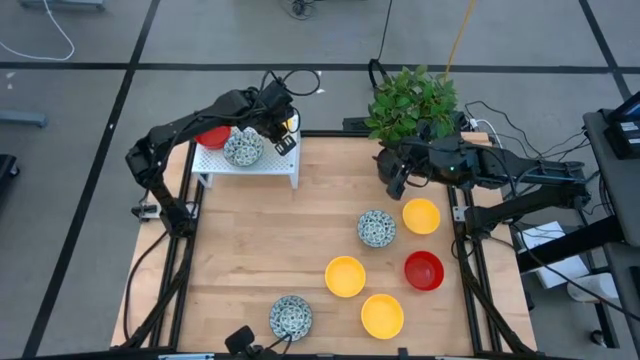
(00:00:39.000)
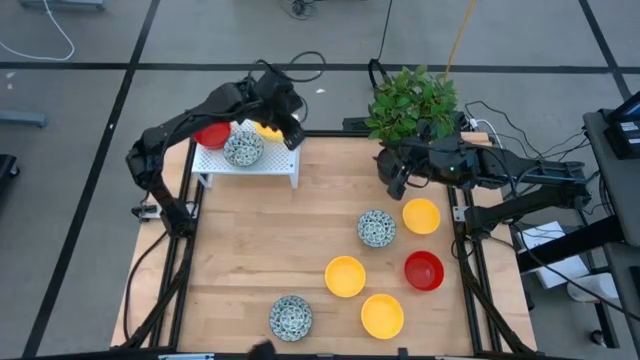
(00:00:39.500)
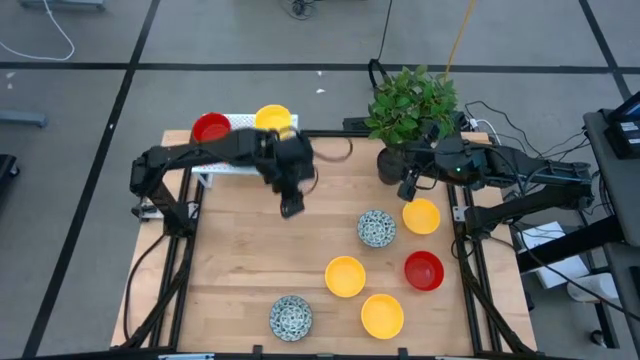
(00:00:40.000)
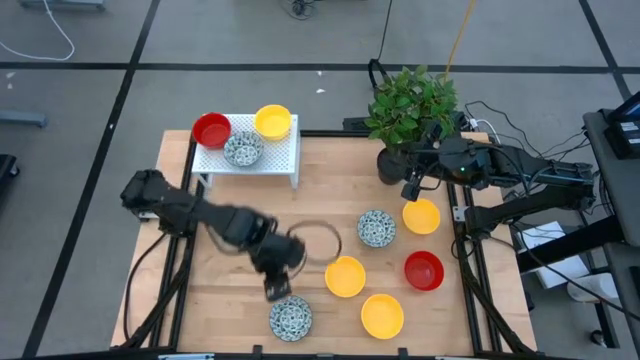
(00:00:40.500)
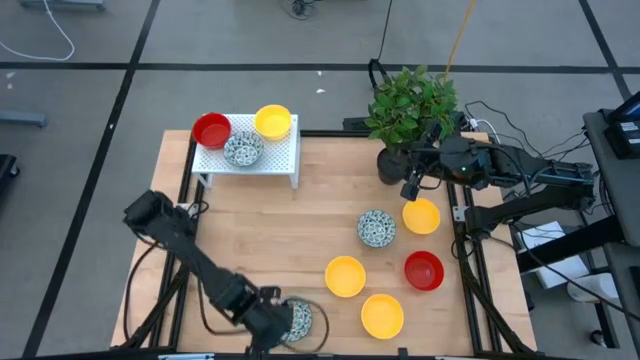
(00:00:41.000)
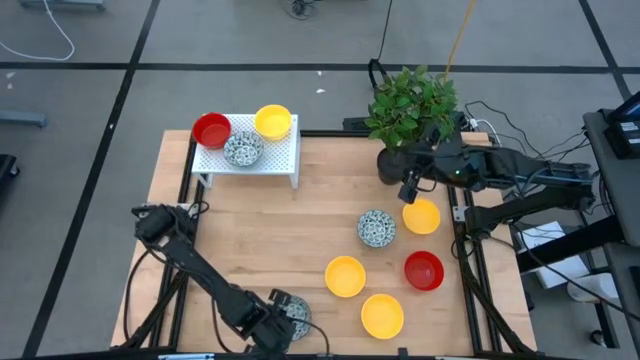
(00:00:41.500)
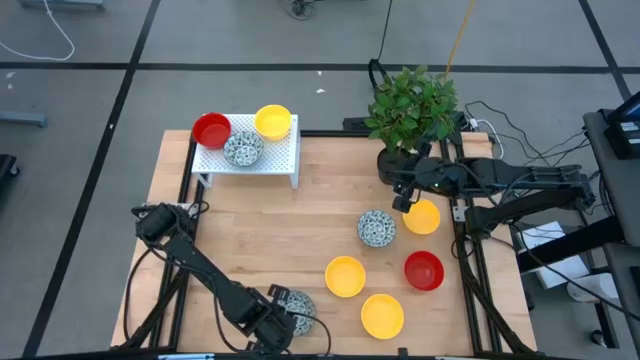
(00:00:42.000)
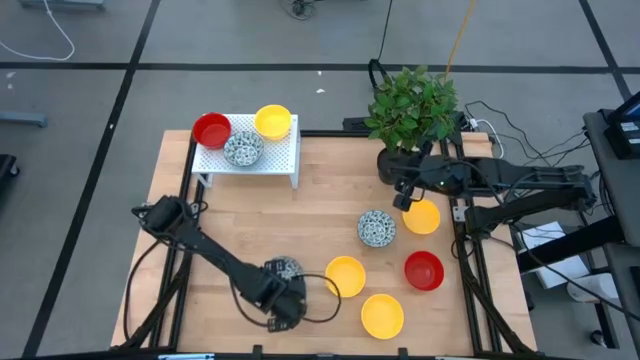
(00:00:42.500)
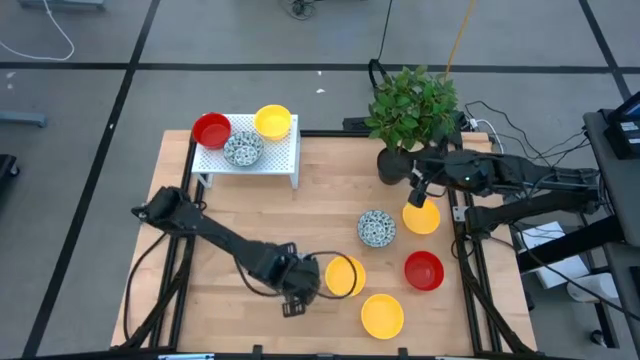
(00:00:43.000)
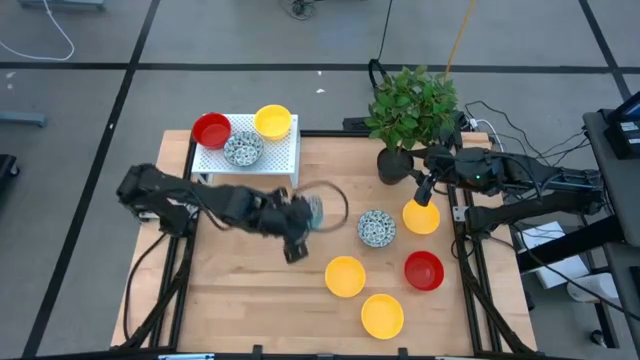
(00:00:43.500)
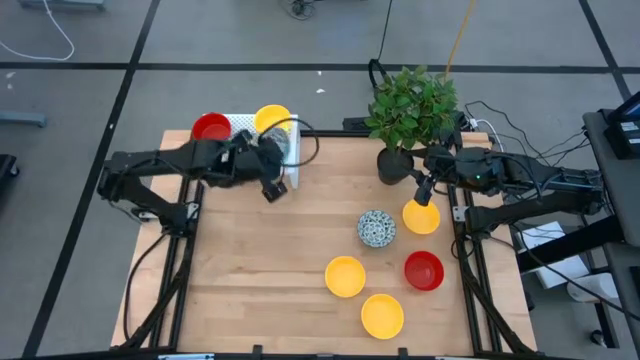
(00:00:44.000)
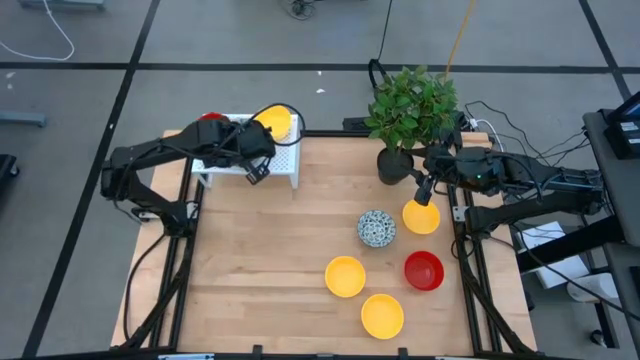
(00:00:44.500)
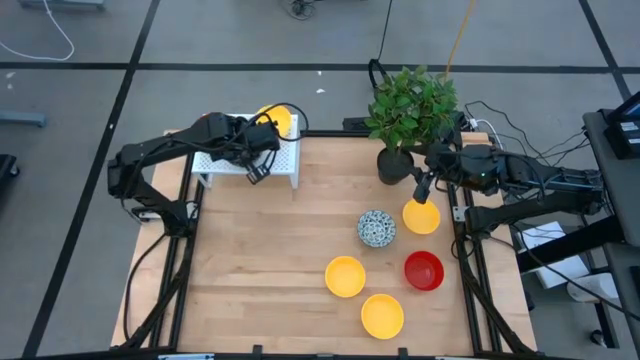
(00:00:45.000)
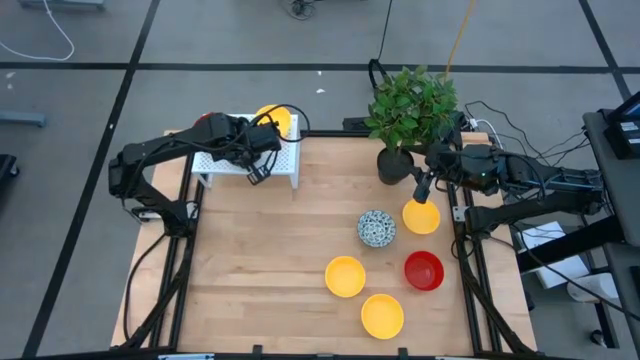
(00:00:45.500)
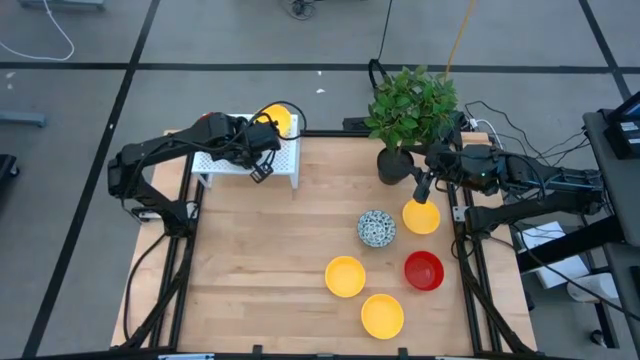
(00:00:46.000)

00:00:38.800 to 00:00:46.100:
Task: Pick & Place Mini bowls
Stack the blue bowl on the blue bowl on the shelf

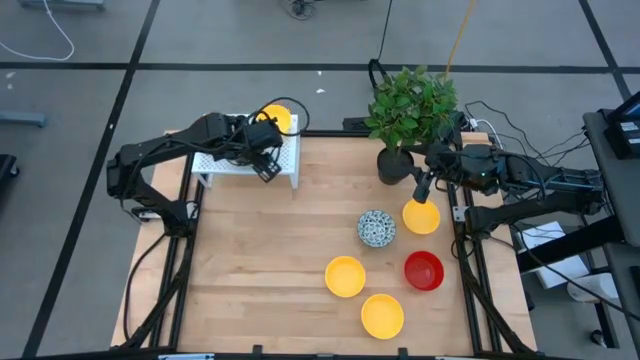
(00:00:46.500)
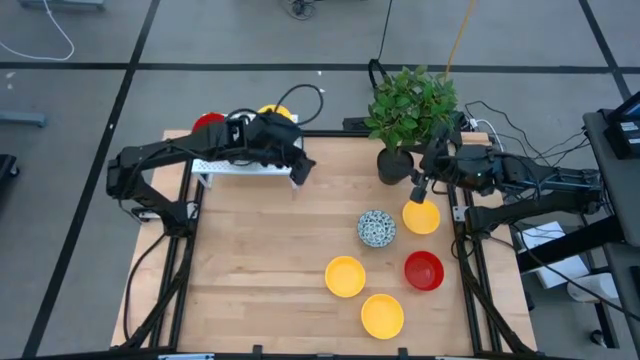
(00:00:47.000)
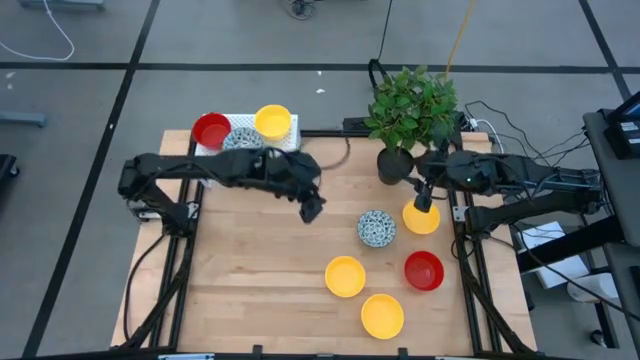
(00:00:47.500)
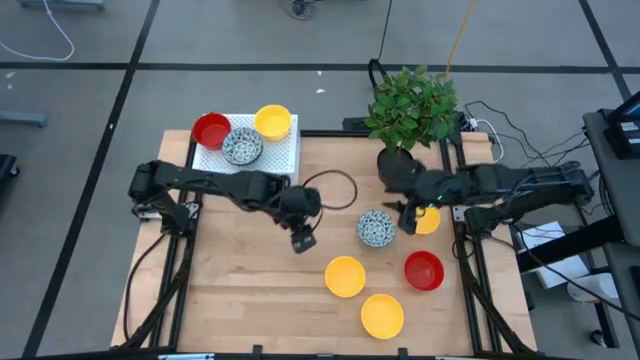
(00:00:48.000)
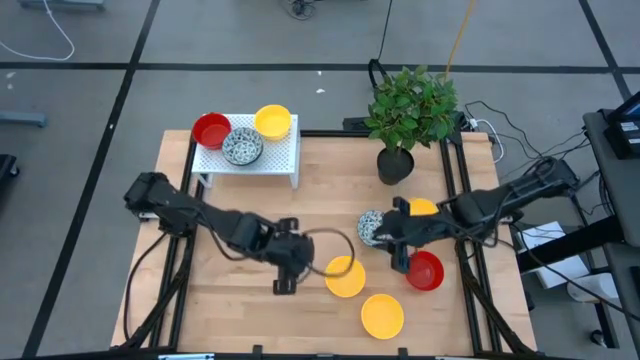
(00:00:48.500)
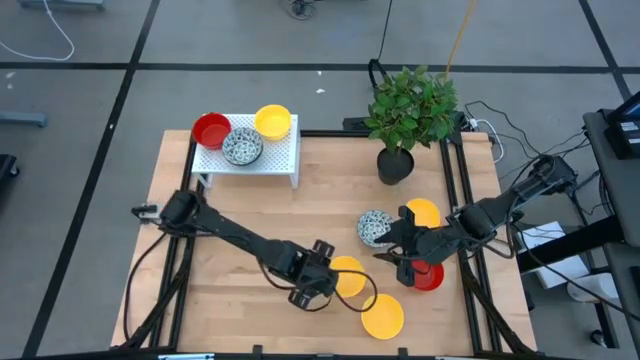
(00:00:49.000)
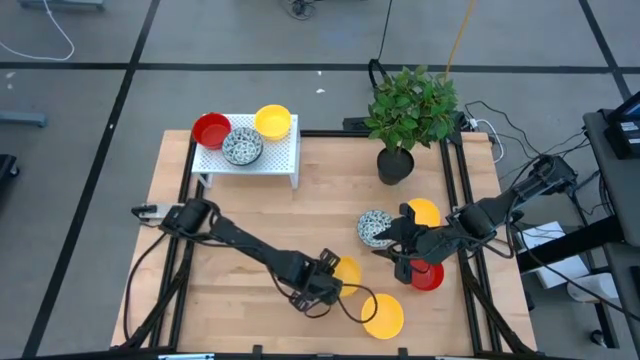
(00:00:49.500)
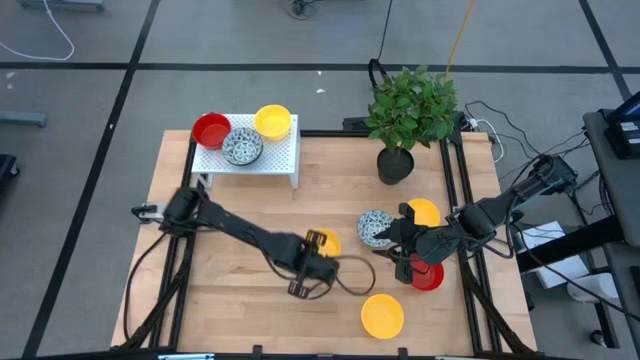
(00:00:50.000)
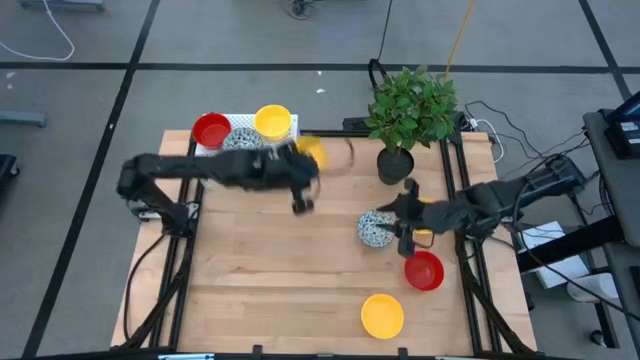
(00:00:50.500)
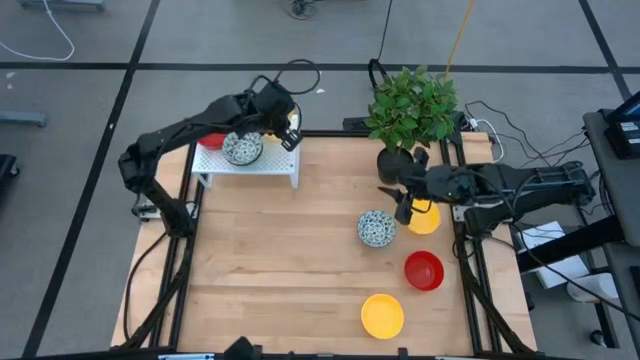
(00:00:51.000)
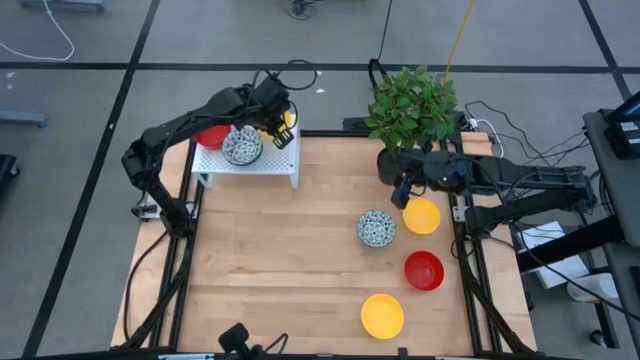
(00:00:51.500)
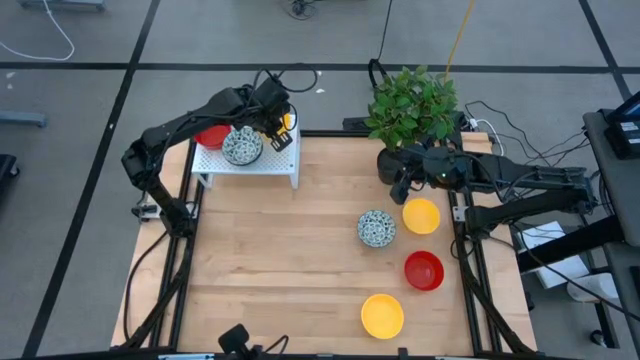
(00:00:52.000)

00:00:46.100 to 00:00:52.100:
Stack the yellow bowl on the yellow bowl on the shelf

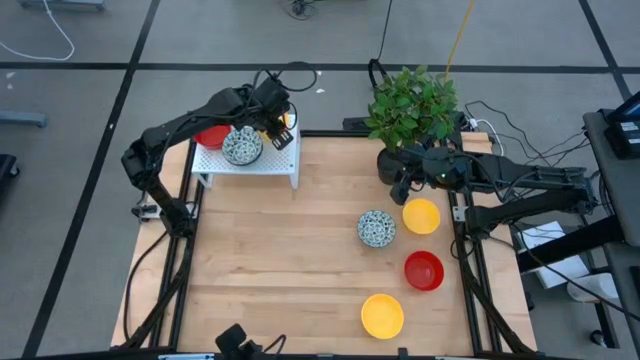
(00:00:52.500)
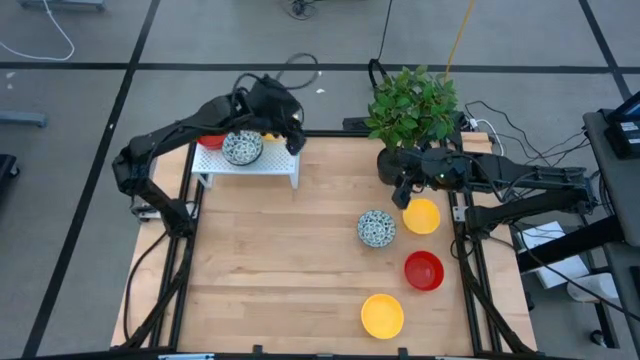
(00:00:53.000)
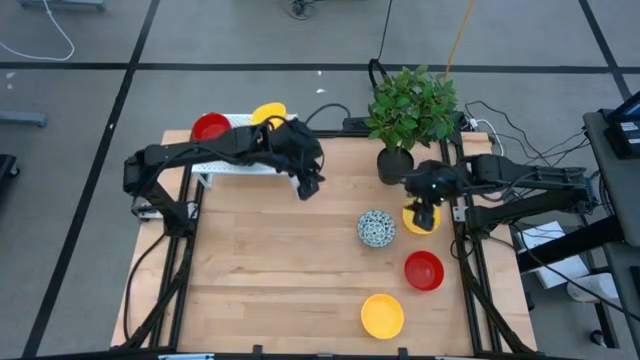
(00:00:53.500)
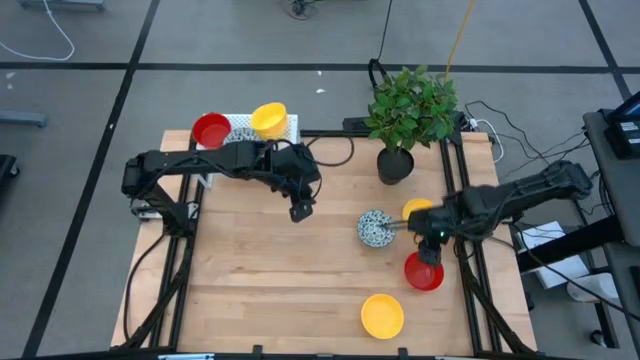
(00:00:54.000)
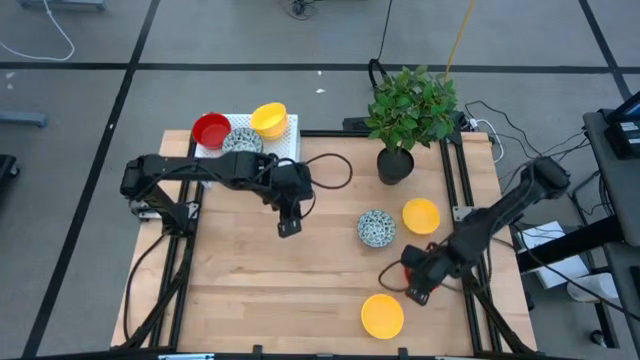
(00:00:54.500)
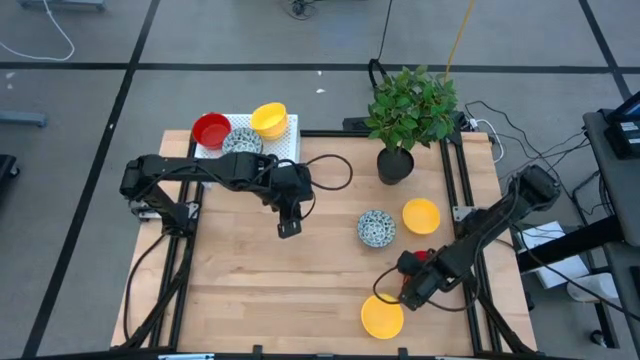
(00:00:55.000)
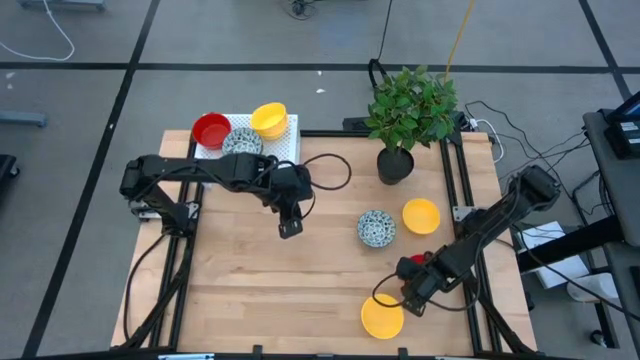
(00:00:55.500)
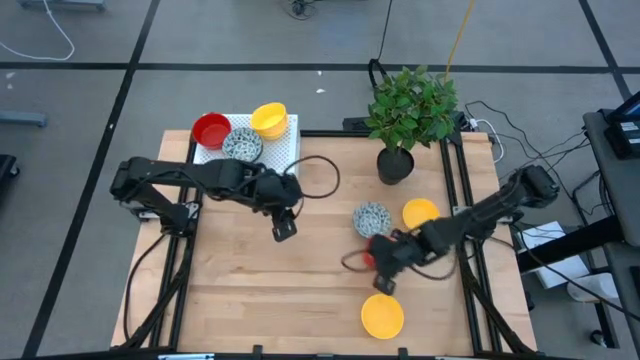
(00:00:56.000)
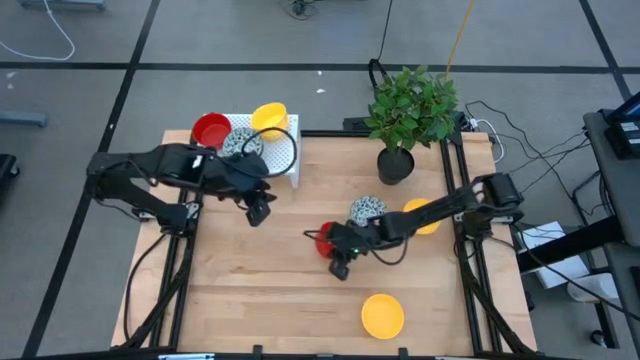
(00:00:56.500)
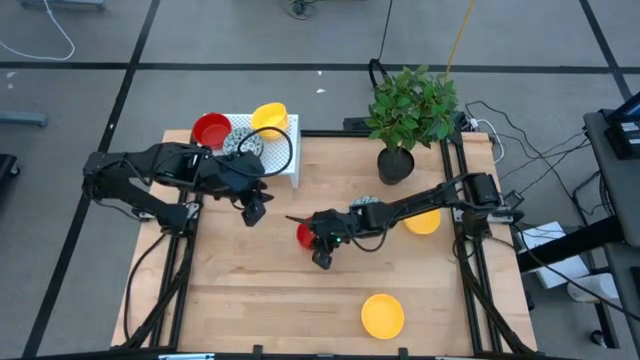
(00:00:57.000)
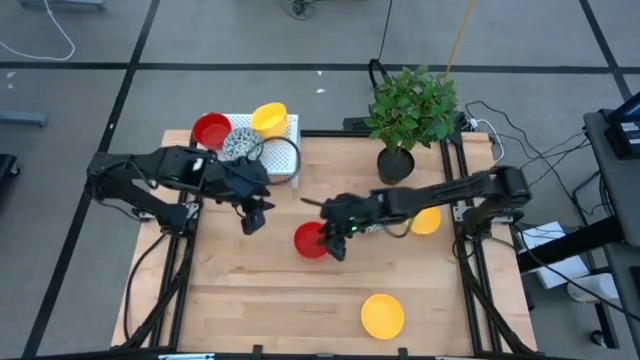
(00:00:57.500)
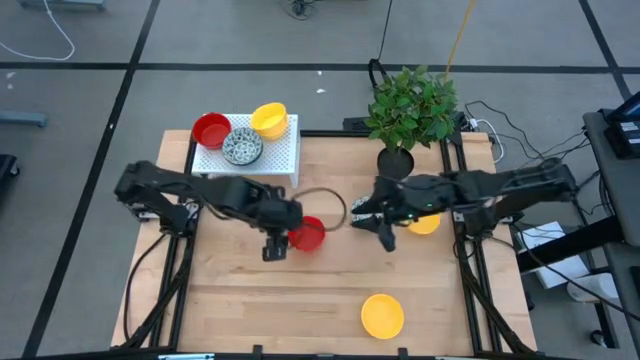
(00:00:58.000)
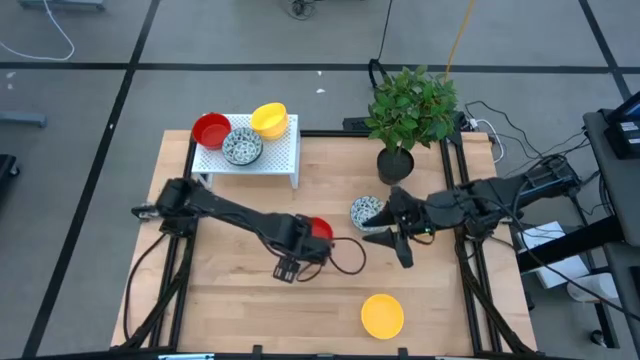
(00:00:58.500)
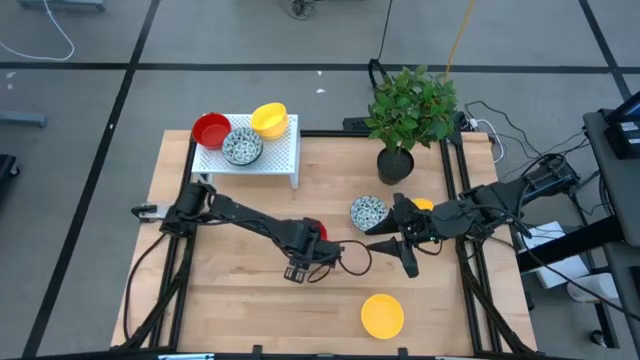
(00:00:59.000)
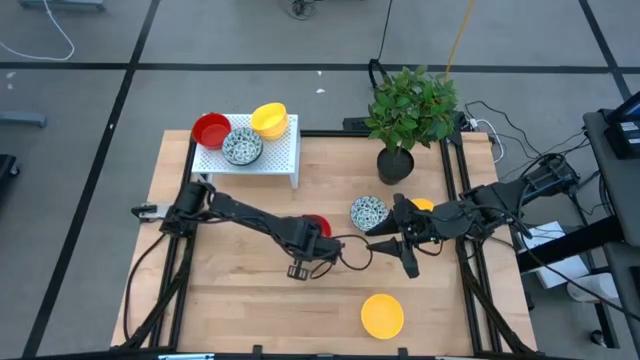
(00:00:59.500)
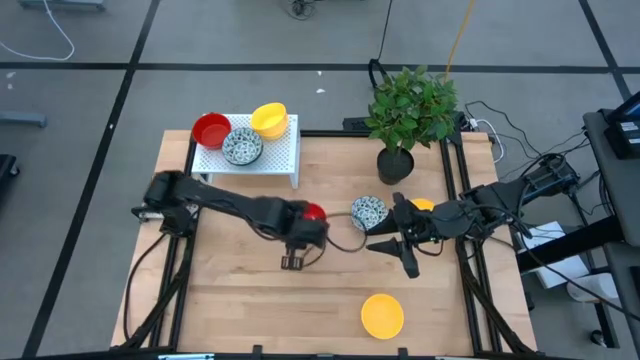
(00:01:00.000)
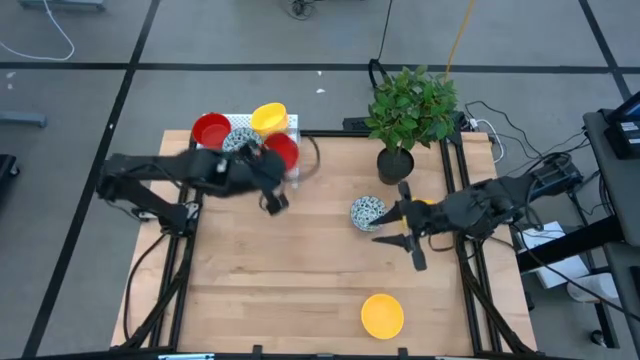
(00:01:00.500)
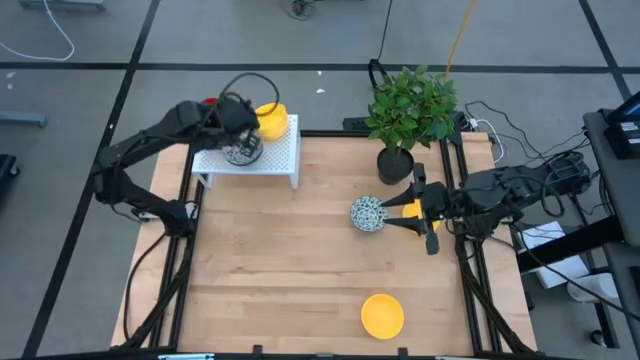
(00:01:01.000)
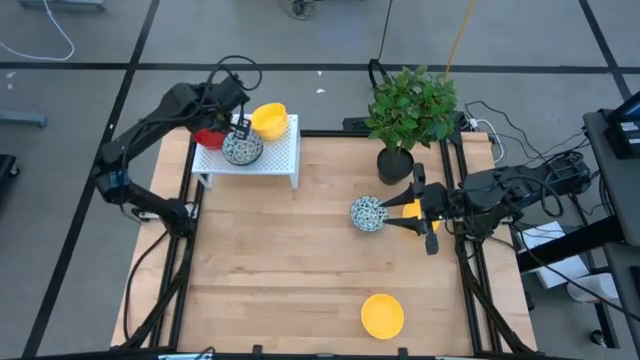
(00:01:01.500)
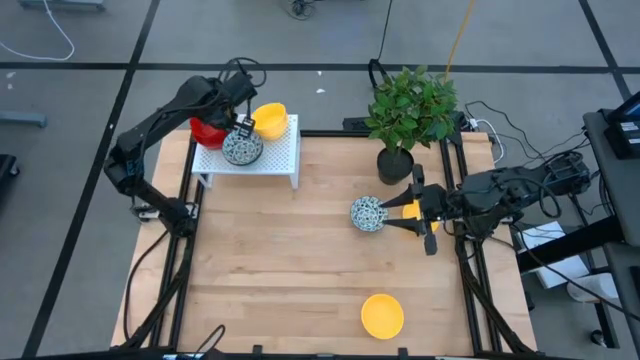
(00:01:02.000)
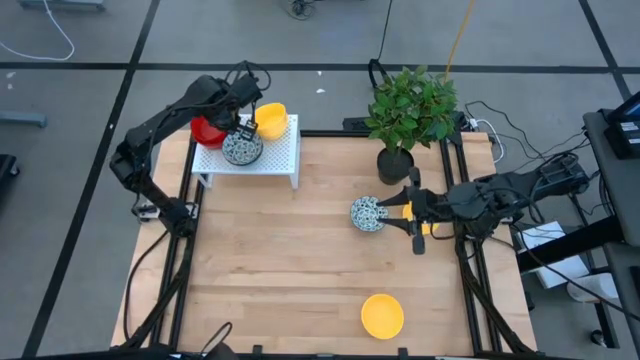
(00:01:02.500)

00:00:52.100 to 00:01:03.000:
Stack the red bowl on the red bowls on the shelf
